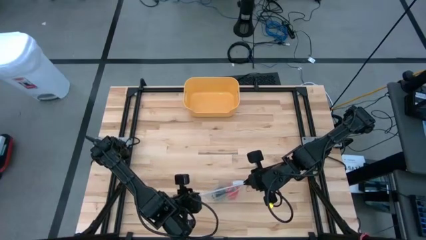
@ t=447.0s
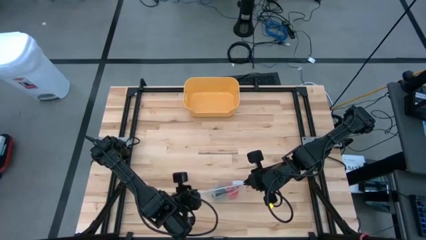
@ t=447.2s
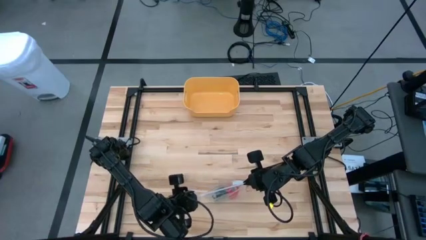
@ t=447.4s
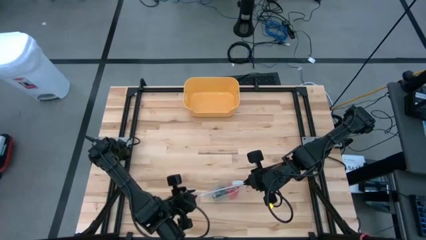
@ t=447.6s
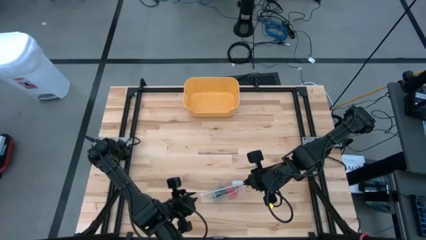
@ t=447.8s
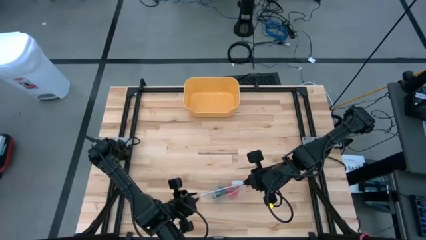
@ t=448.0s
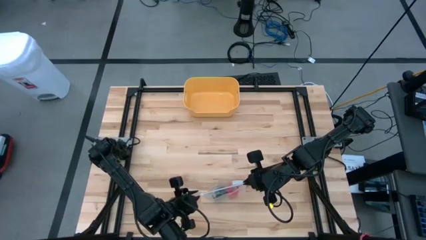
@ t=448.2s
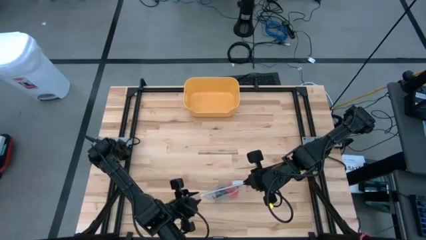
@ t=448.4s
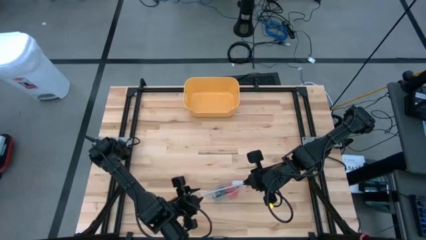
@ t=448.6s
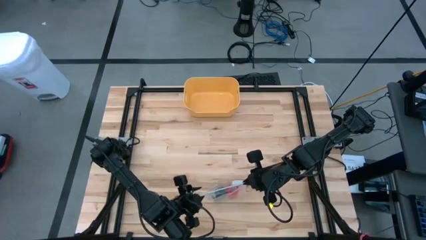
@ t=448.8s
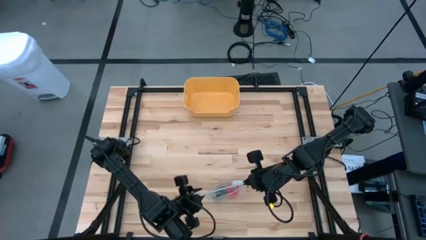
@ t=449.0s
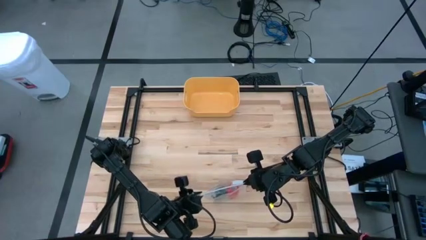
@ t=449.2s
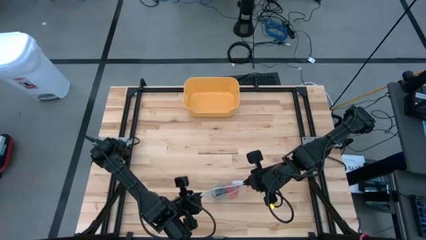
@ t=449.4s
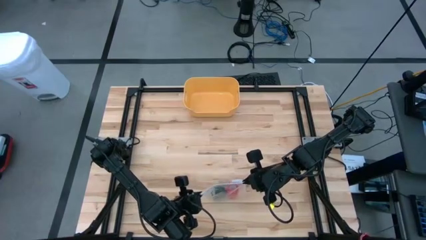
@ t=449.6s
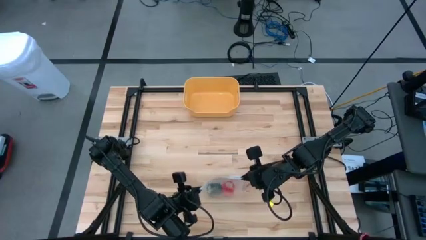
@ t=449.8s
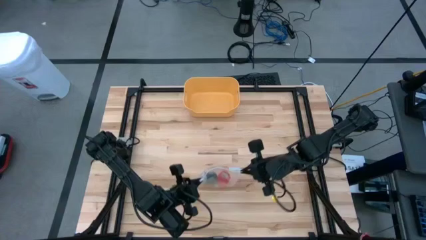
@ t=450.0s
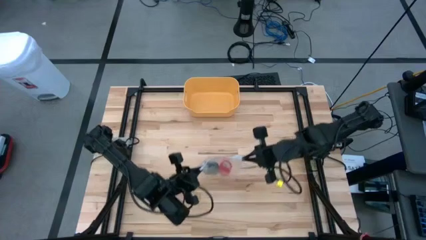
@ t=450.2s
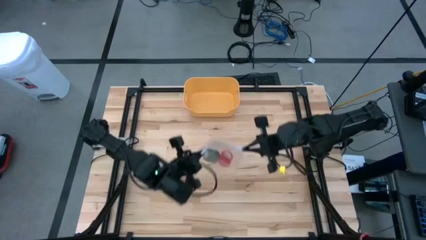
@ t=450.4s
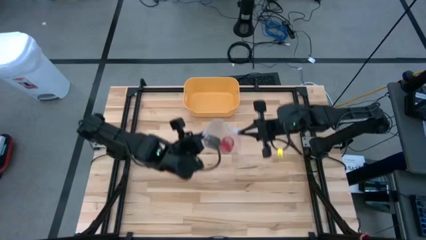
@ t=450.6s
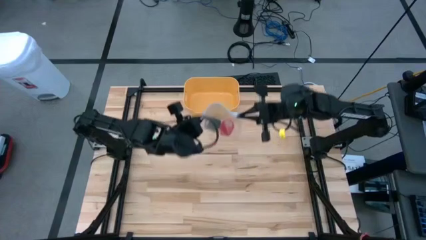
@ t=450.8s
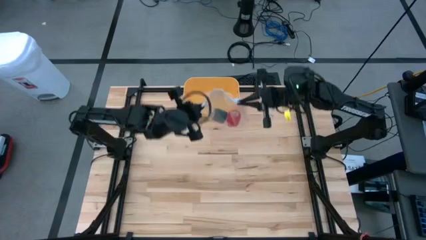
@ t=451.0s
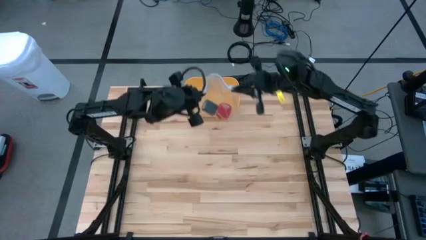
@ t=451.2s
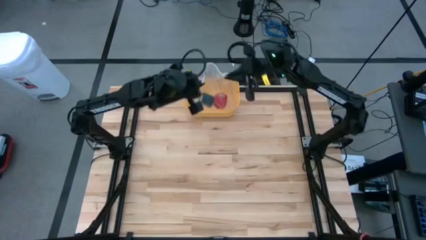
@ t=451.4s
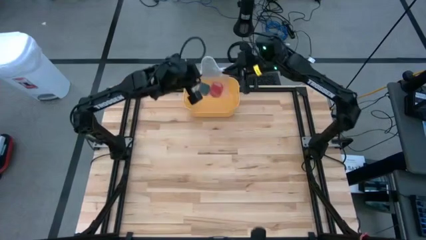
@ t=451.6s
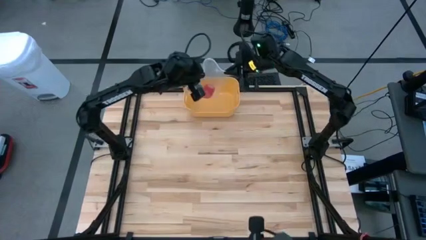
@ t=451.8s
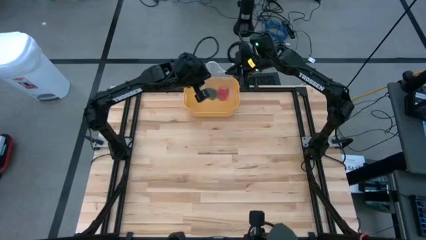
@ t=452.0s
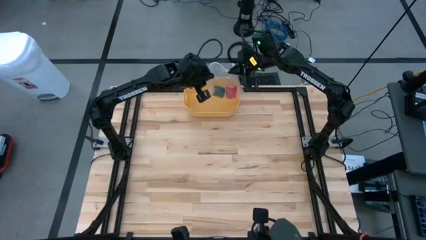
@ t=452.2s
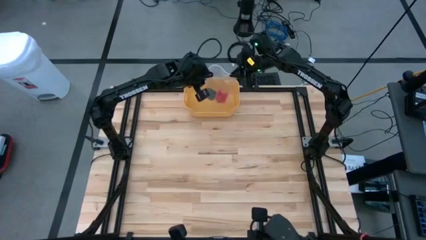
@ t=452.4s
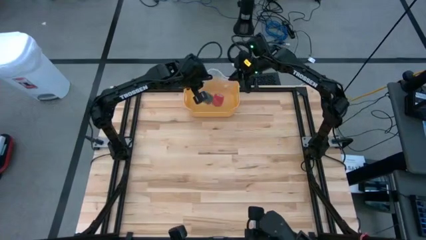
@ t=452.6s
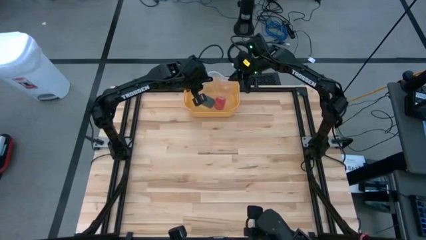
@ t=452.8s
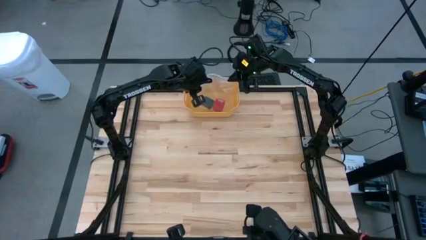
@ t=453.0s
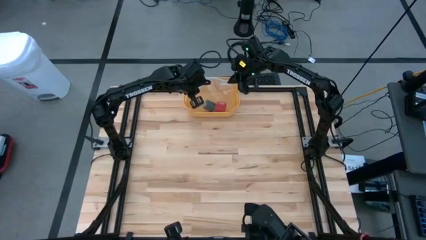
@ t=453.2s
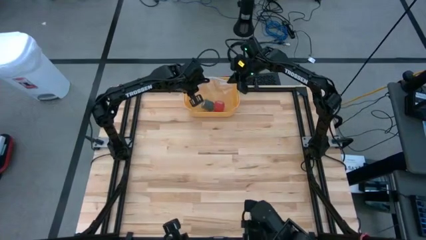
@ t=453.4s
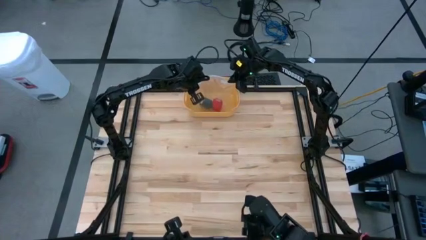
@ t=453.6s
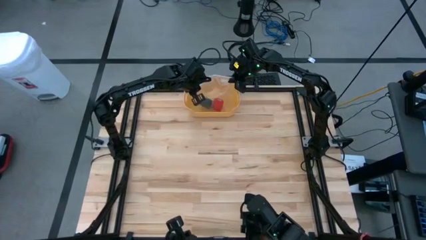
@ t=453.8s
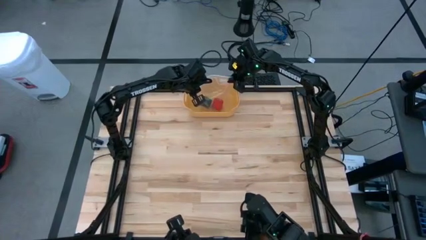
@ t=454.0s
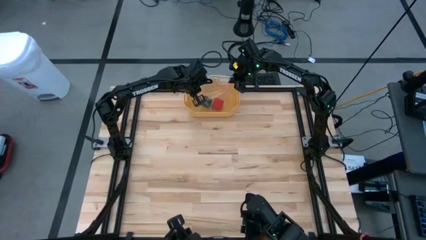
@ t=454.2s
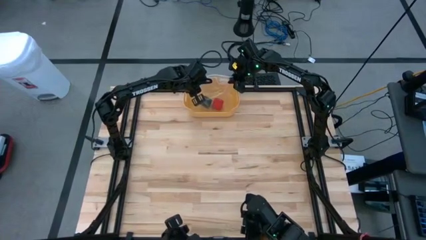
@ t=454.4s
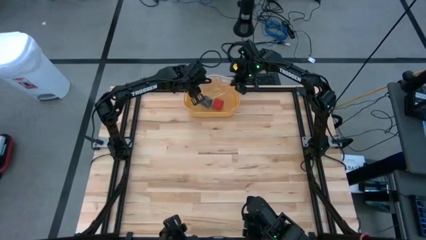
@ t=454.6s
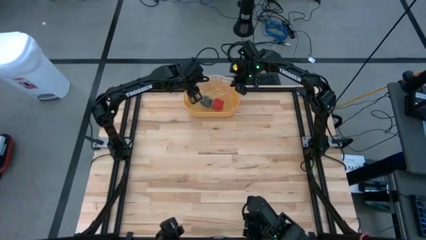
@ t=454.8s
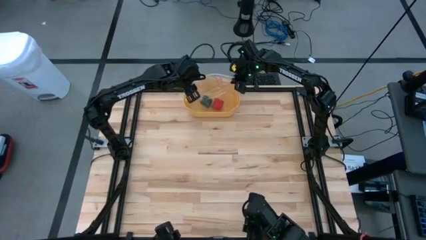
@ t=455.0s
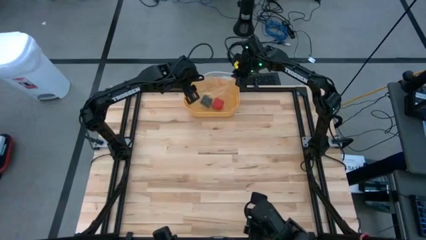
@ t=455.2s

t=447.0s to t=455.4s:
Task: Roll bandage
Put the transparent zip bag with the rolled green and red bandage inside into the yellow bin

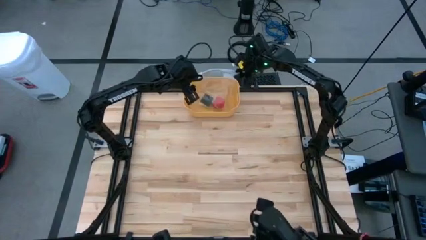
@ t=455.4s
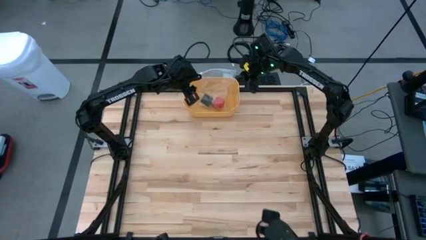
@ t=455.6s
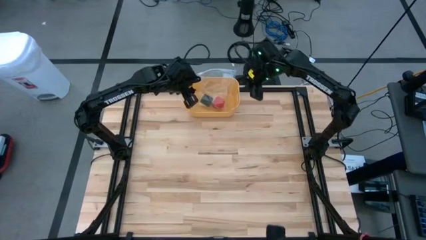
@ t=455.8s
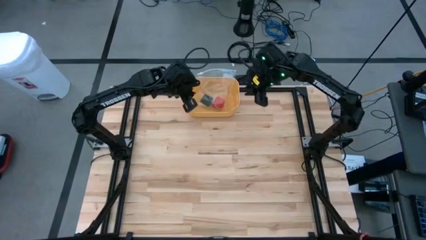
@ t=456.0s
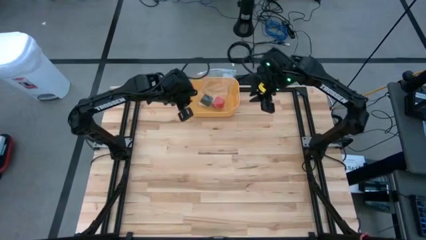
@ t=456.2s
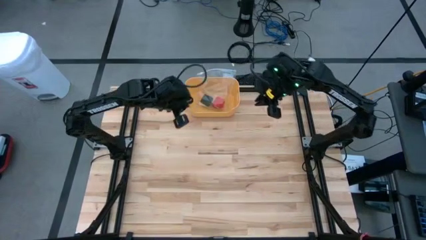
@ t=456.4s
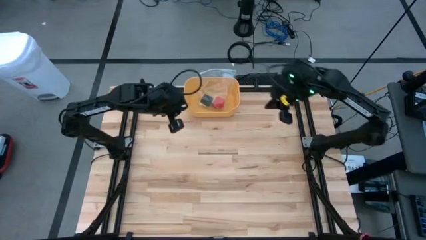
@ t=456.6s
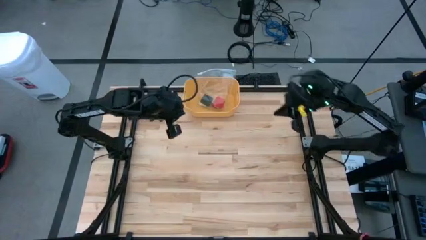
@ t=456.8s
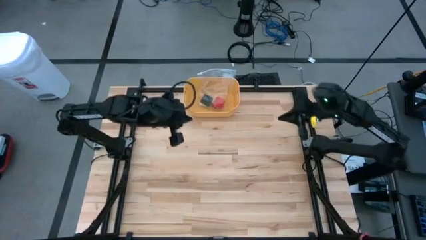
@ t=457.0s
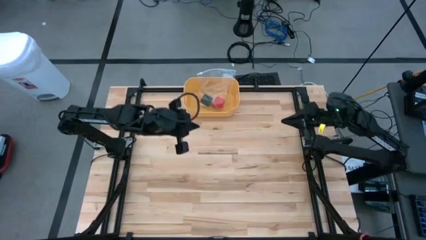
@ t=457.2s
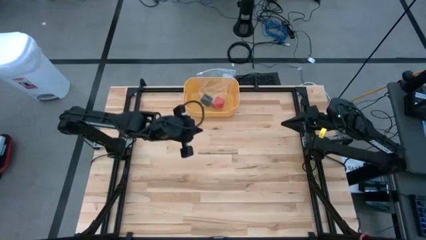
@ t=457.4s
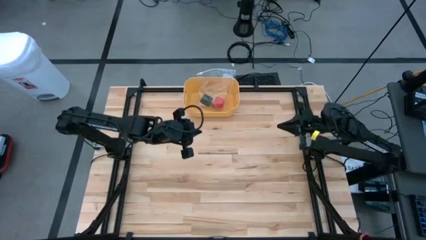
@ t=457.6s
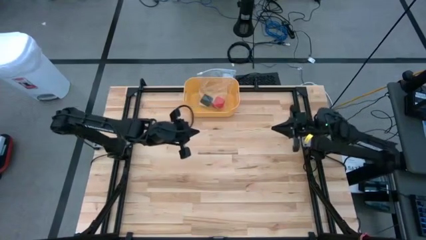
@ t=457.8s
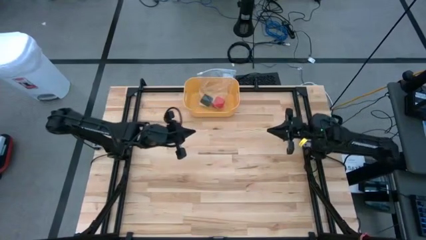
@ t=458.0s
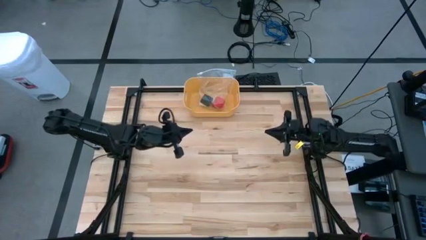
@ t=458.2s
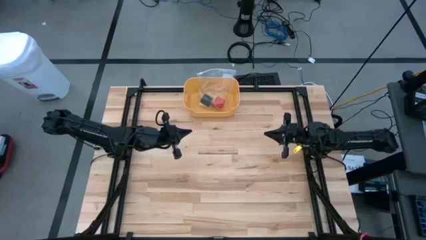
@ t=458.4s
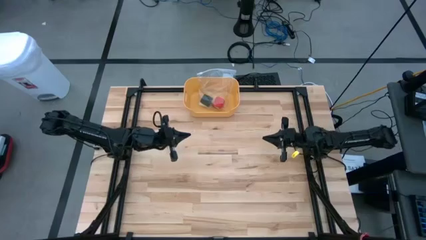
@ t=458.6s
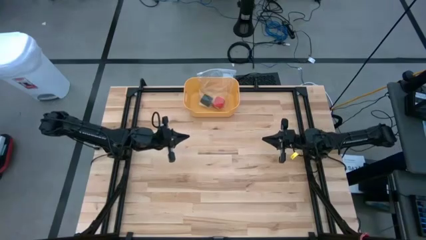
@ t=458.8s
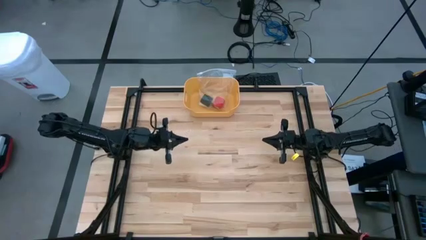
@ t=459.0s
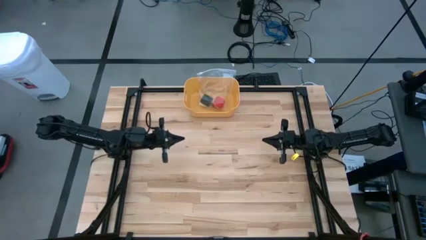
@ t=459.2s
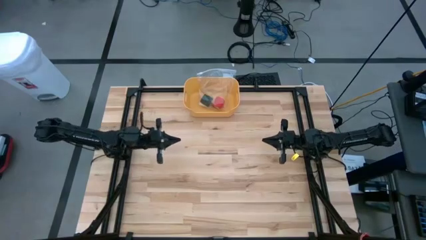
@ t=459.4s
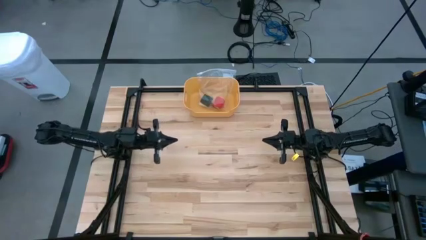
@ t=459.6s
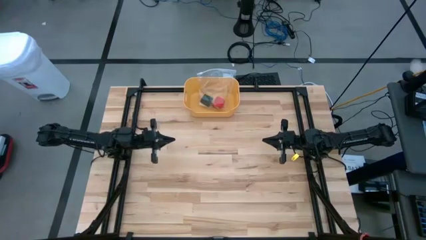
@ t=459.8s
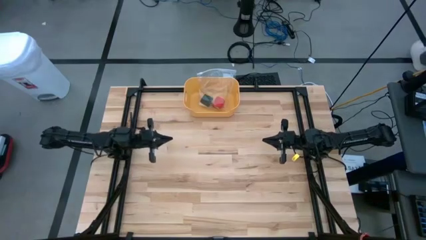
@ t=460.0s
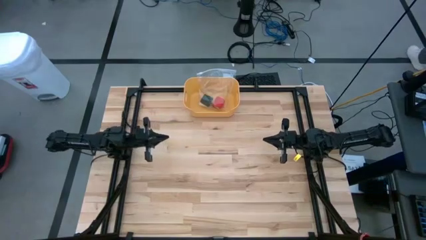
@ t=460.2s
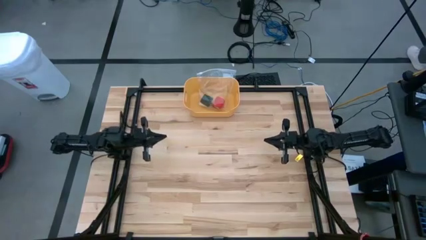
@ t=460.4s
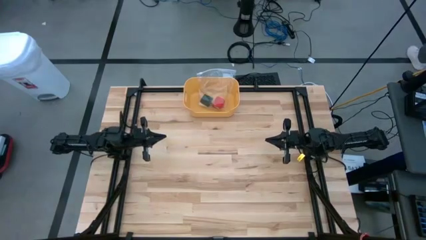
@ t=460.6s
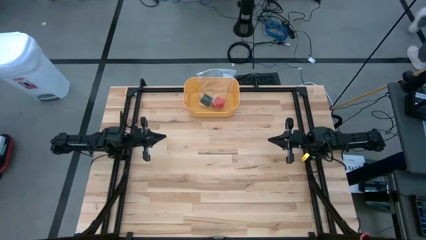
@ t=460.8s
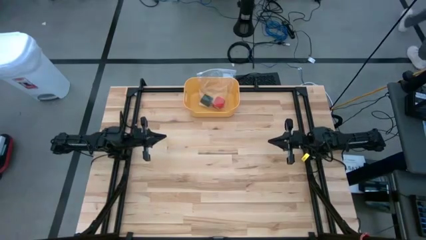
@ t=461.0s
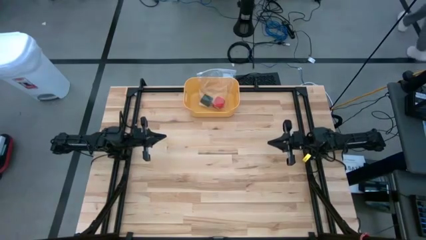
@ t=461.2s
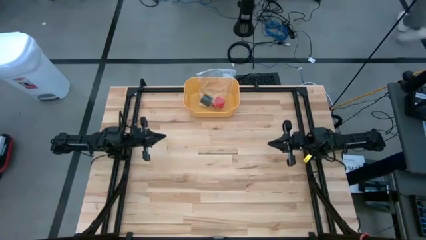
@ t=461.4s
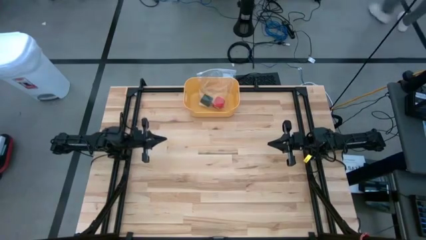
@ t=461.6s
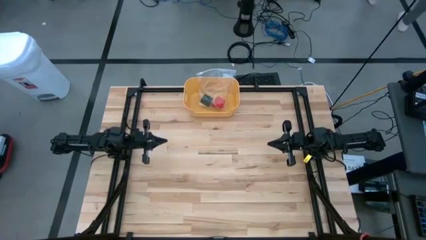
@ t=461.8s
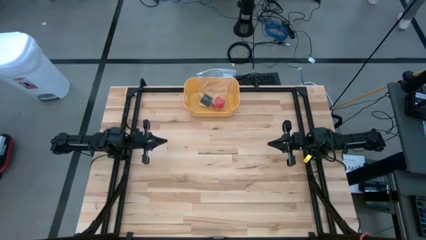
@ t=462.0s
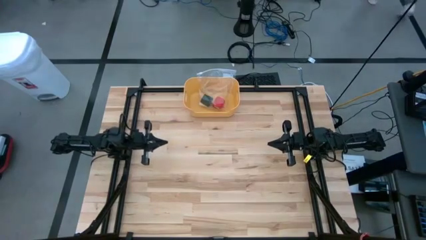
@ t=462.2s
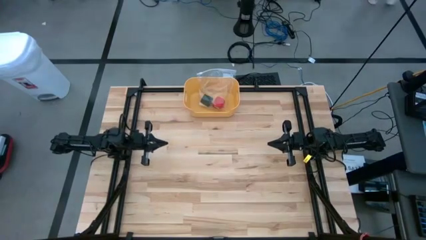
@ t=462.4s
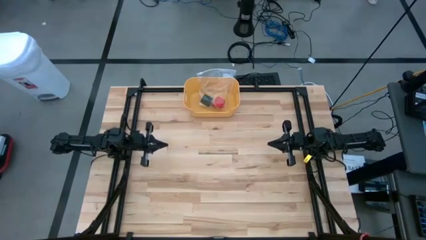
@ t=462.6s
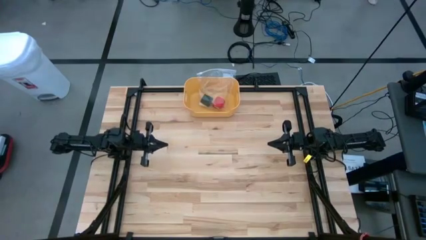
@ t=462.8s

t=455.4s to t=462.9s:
Return to Home Position

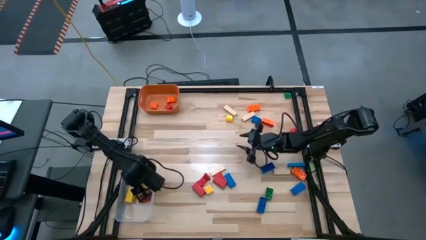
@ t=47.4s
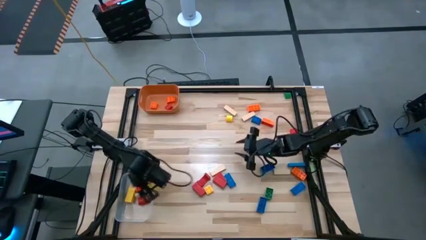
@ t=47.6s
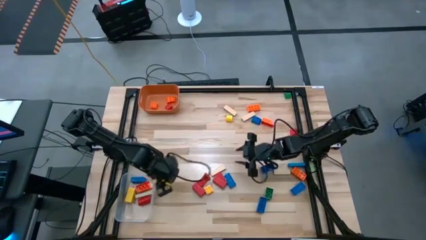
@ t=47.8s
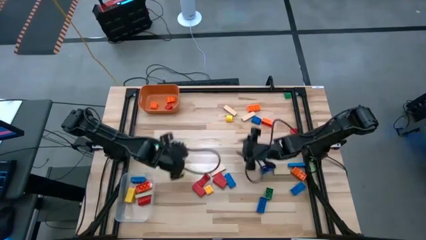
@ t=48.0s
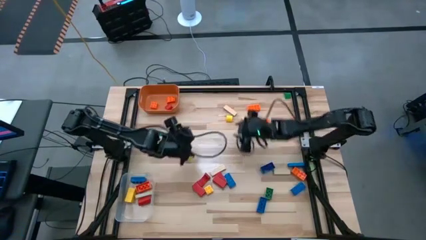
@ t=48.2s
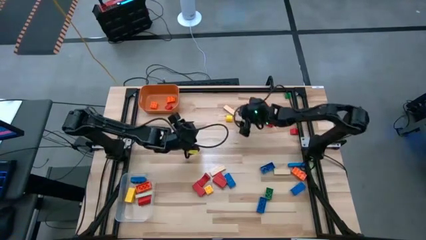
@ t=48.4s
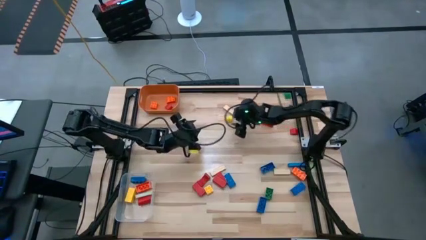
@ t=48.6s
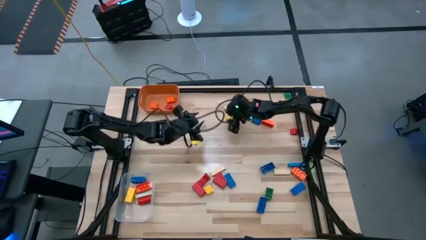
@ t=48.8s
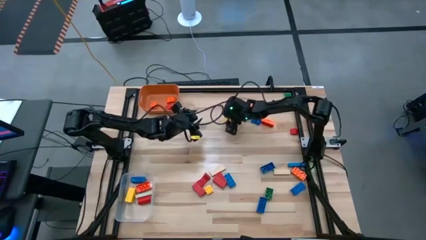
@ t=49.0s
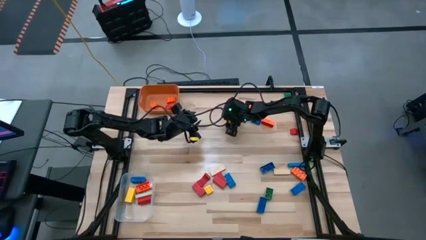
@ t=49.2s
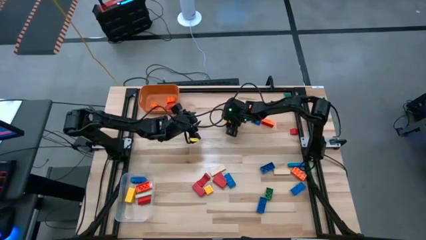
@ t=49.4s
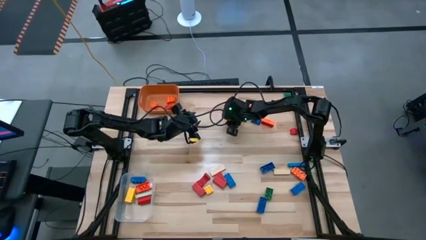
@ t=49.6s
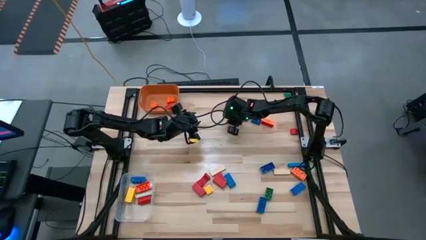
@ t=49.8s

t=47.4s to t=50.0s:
Task: Sort blocks by size
Put the small yellow block into the orange bin
